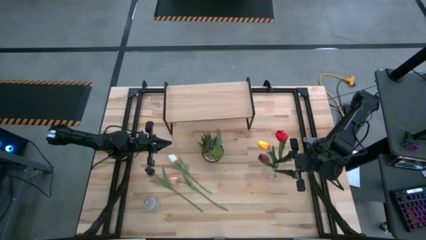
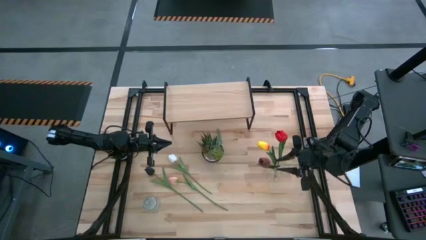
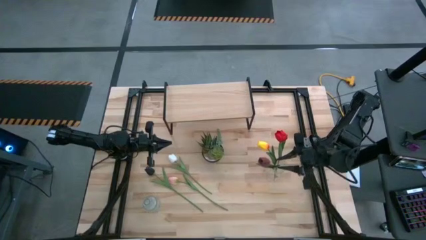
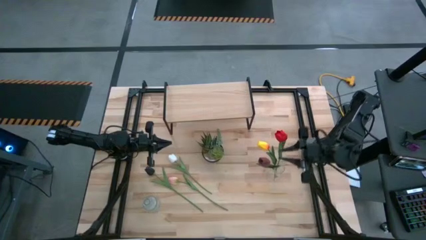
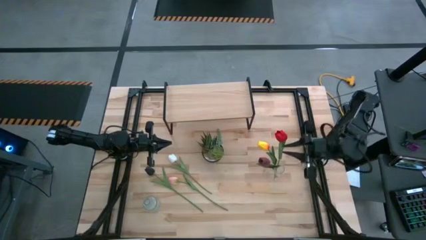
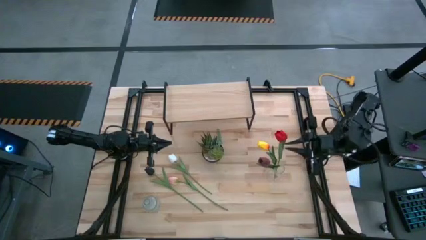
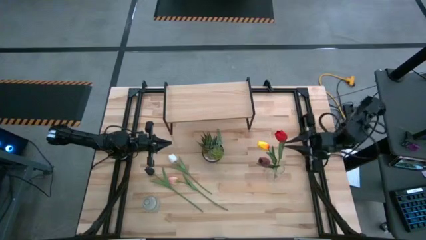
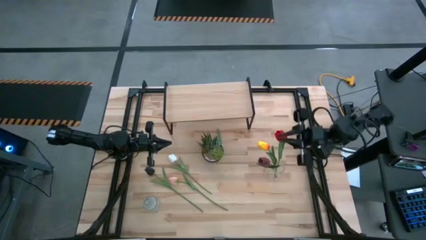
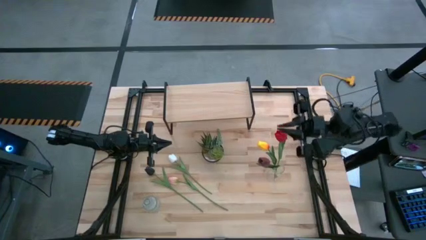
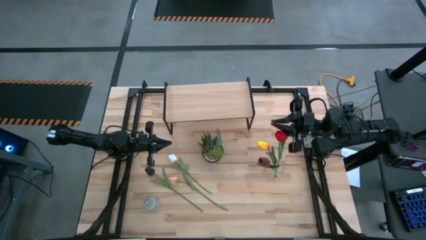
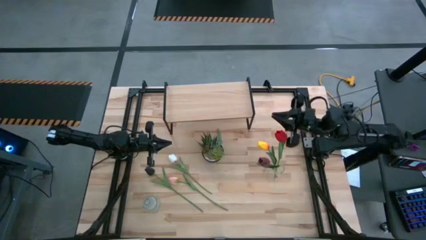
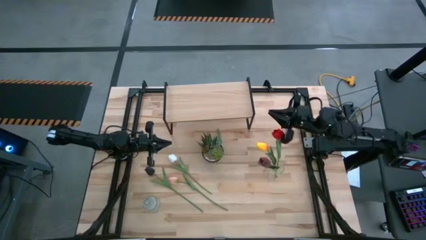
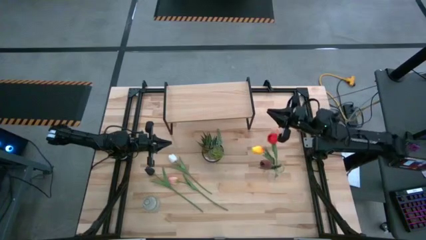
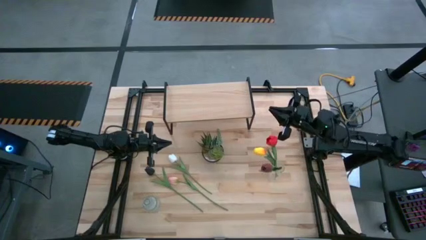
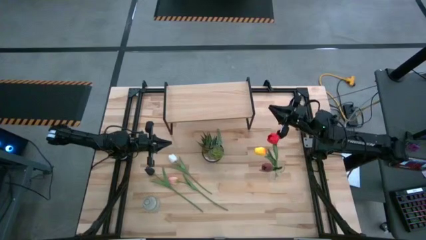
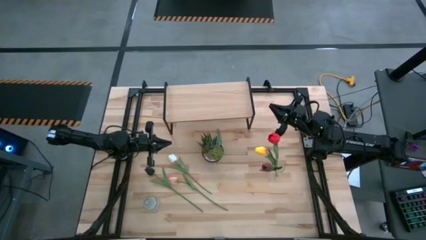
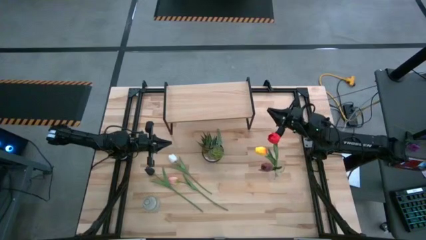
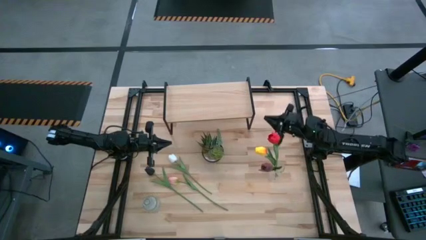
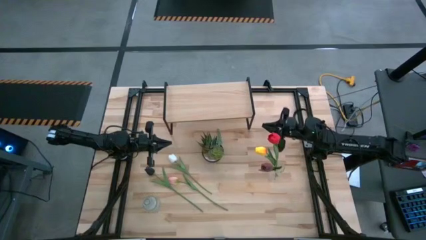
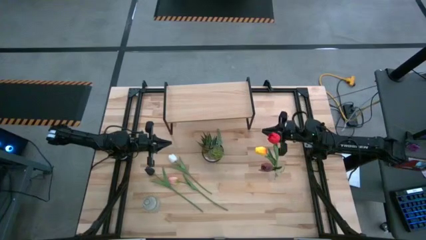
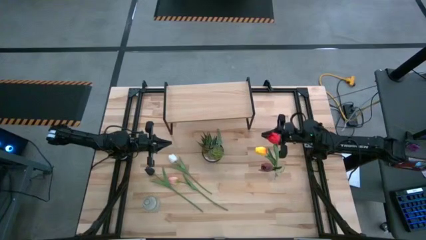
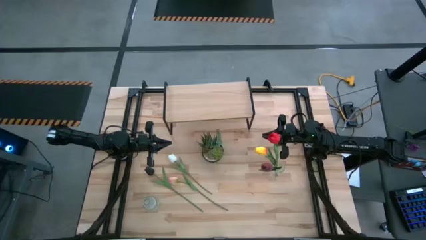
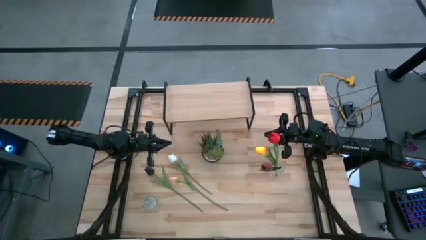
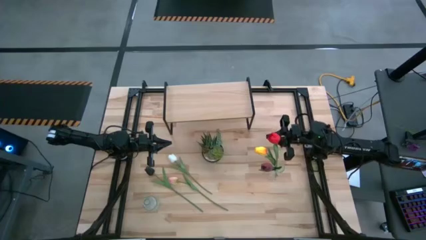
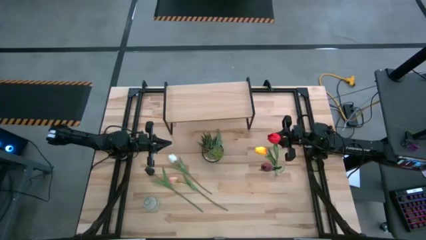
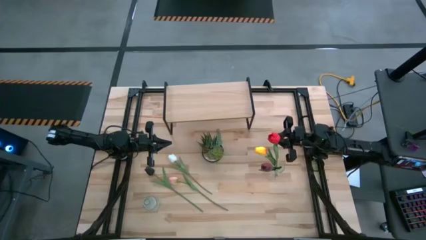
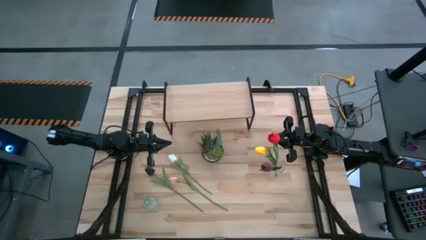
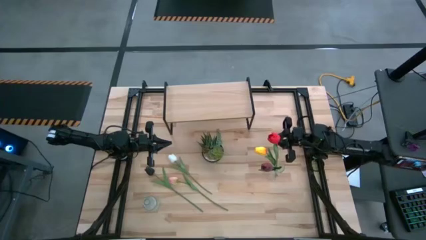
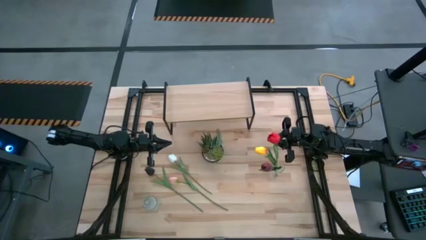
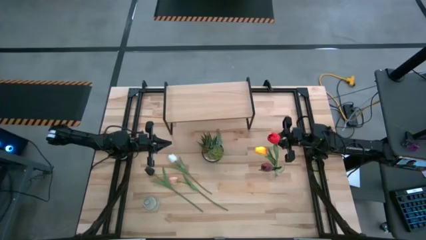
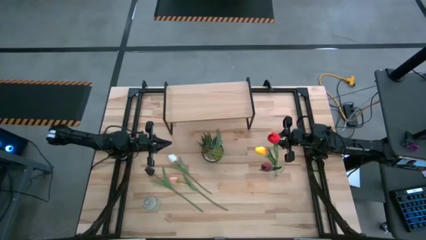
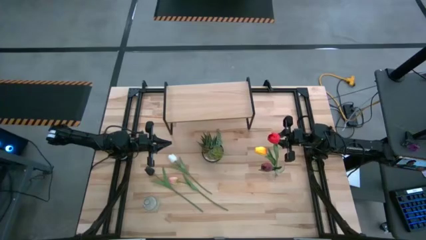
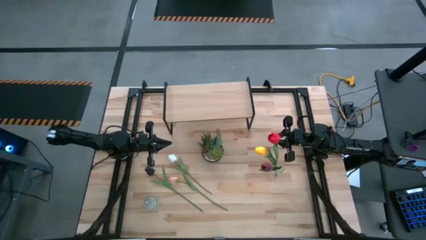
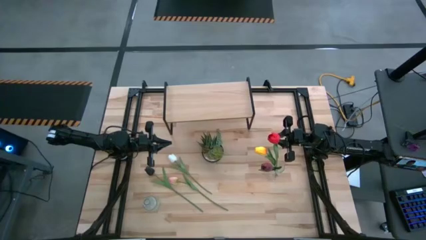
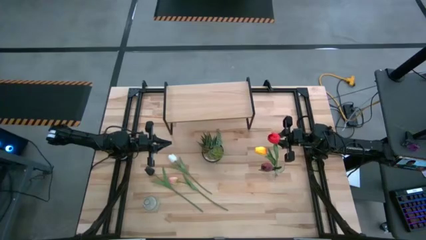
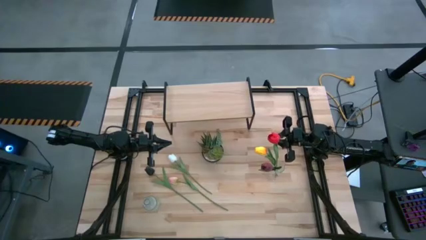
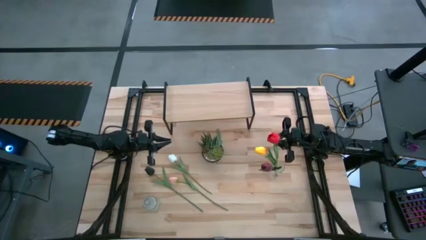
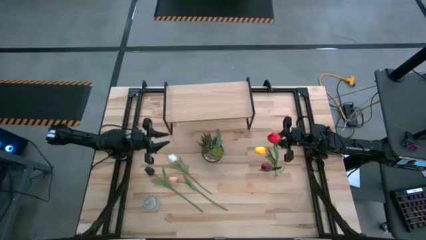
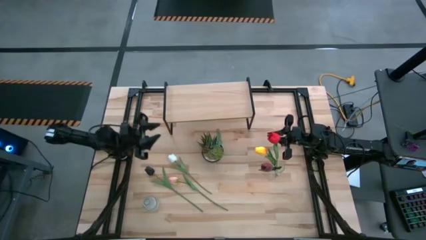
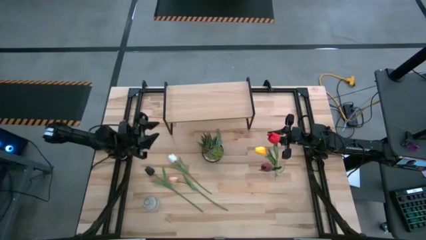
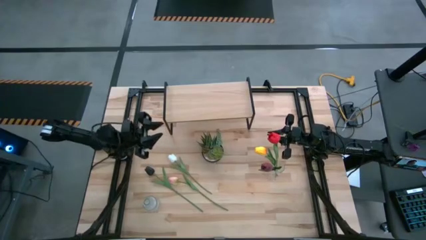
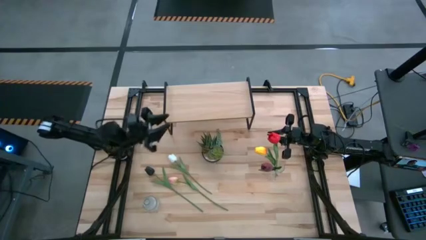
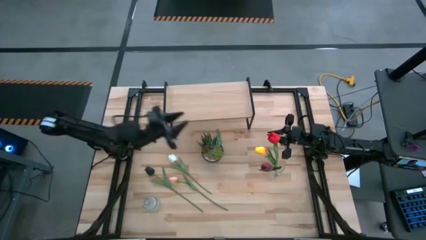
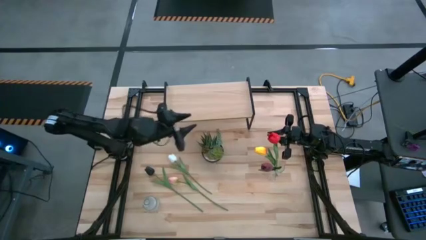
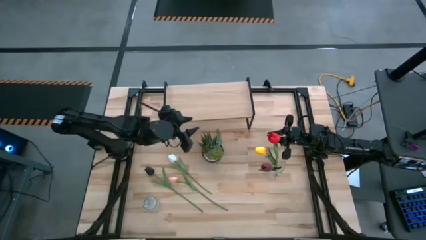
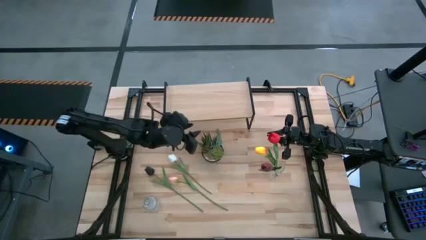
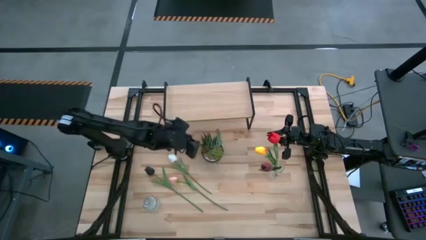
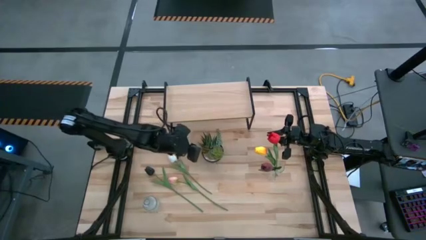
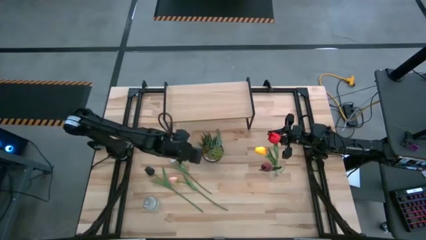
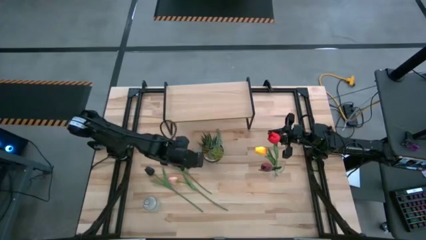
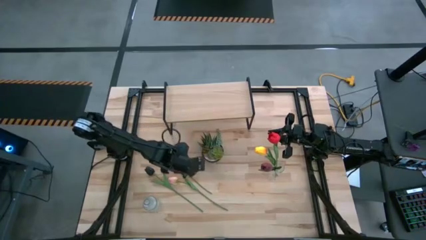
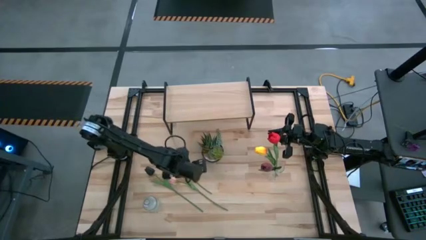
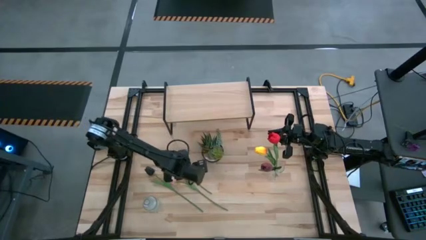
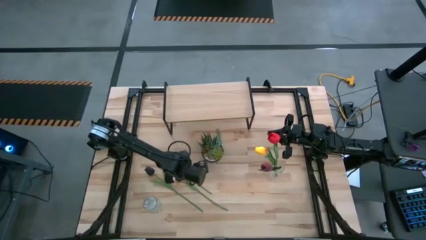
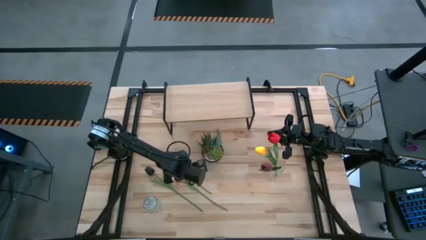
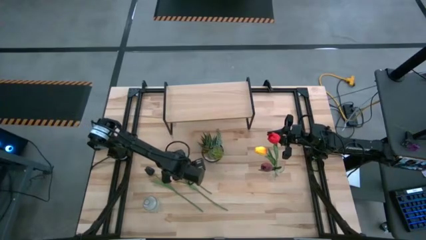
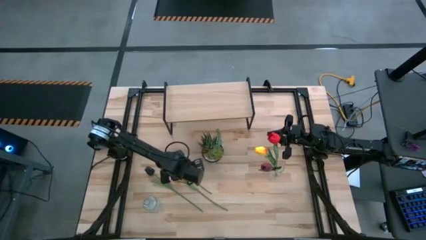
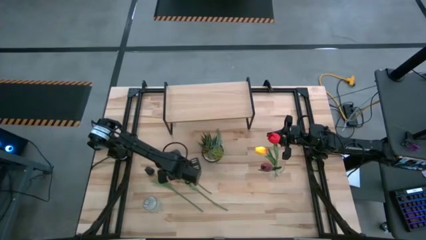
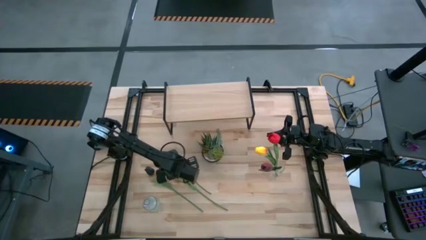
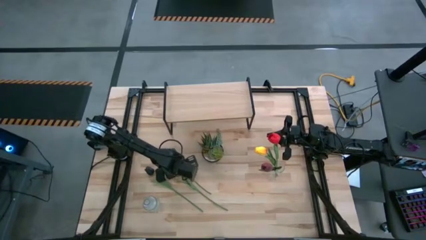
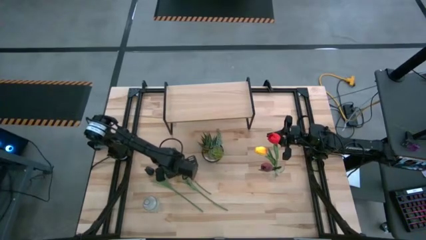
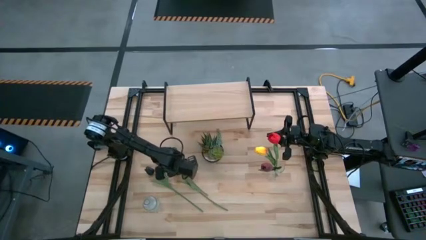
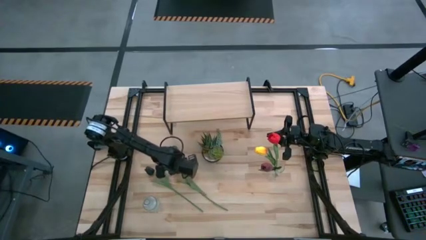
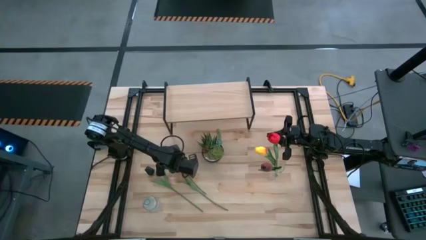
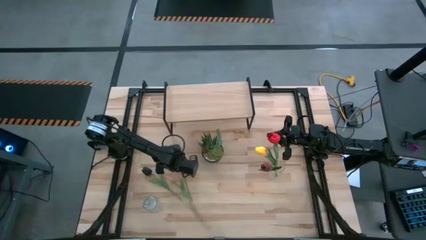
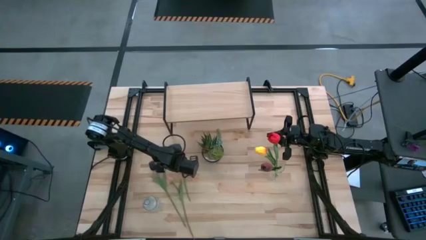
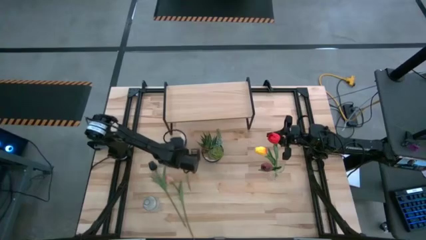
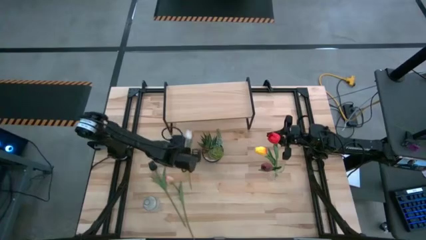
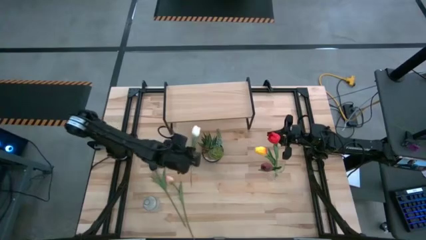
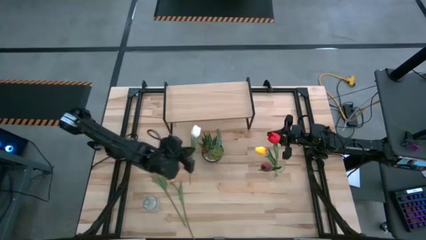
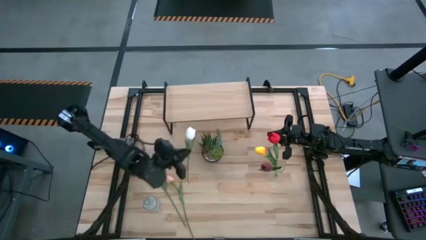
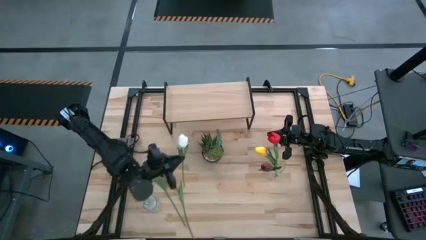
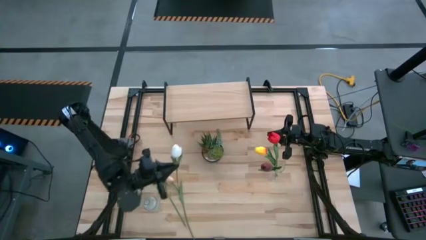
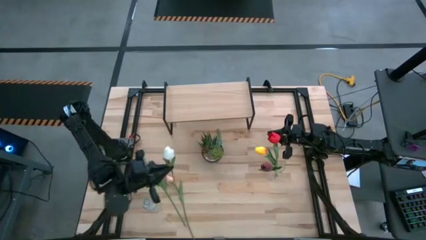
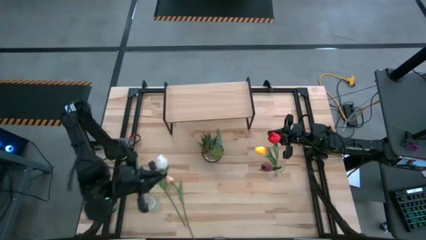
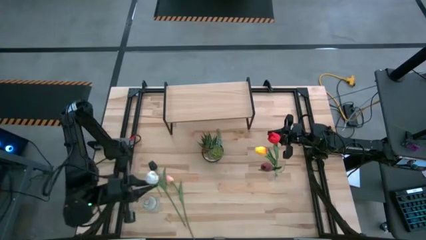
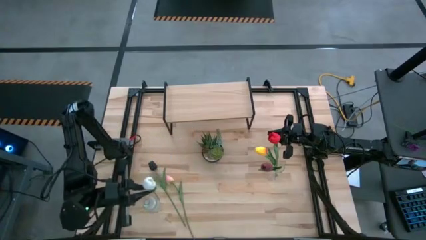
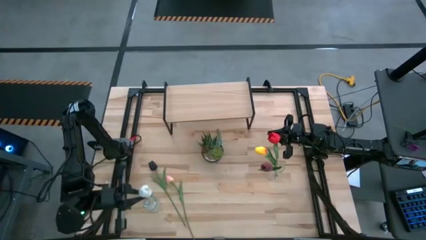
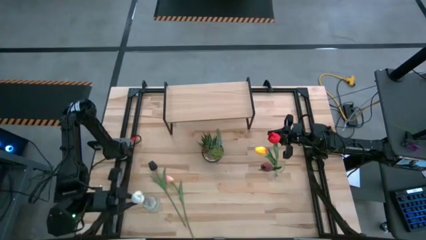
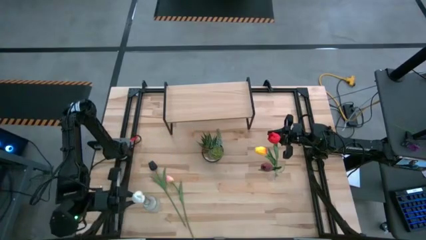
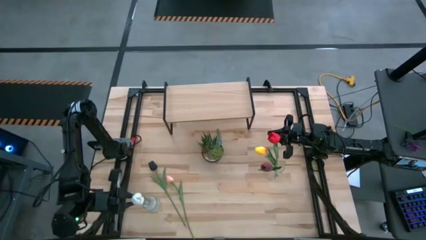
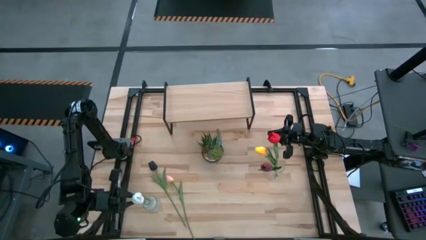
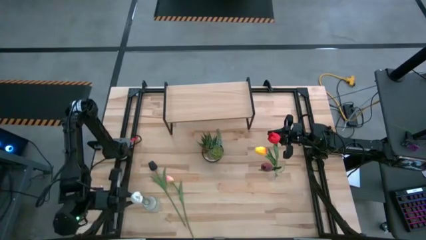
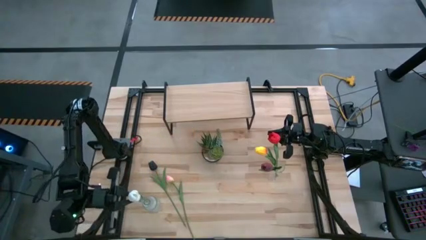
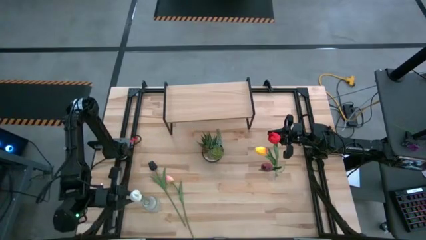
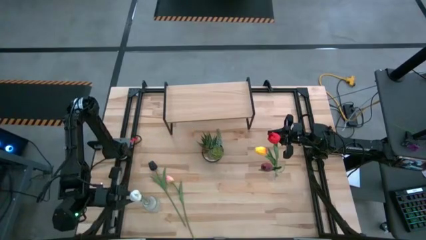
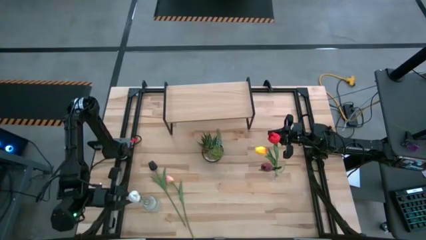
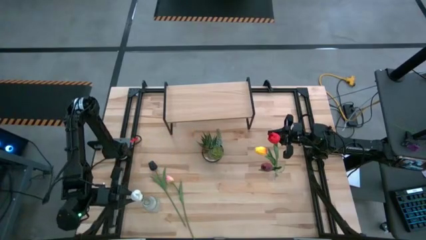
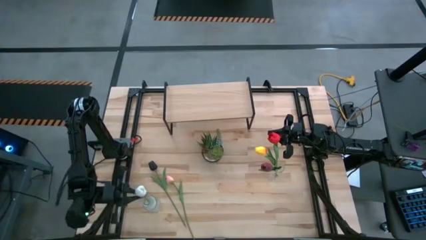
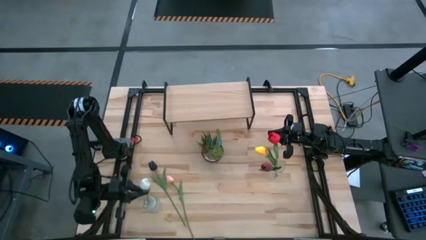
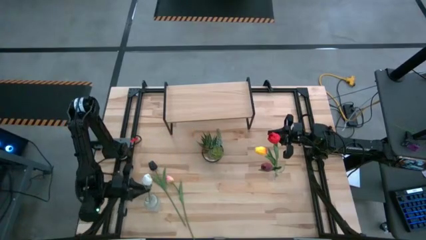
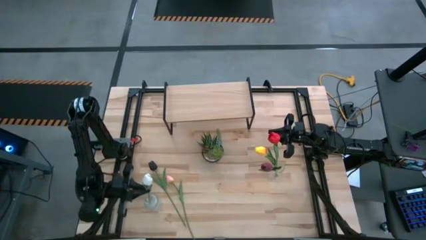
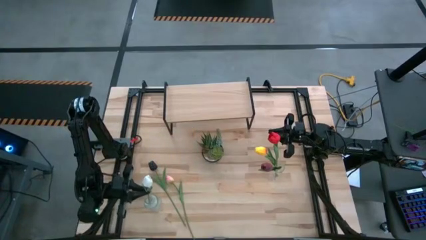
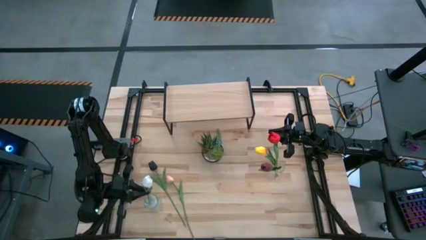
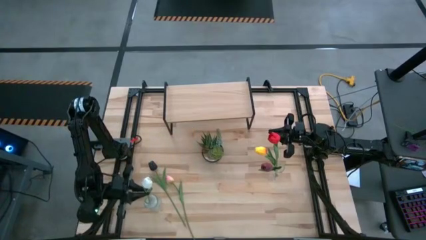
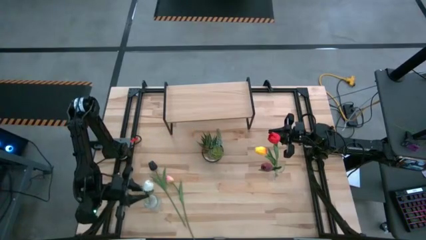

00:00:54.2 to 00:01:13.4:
Task: Pick and place flowers into a vace then onto a shelf
Put the white flower into the left transparent vase
